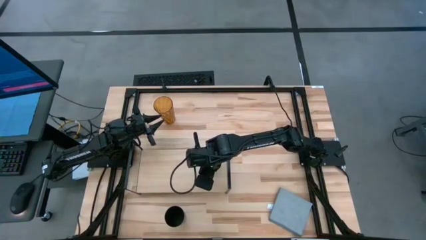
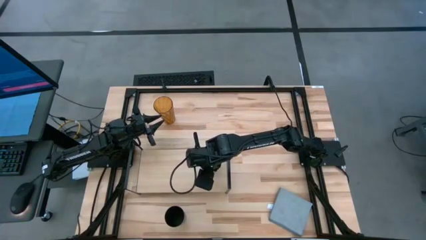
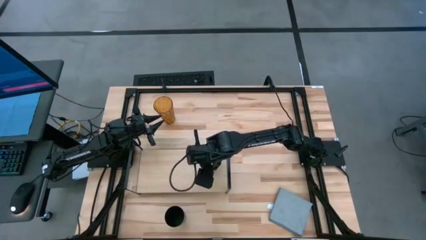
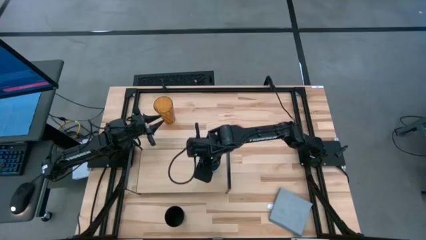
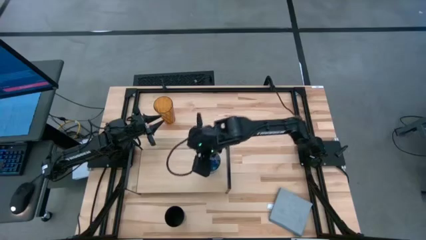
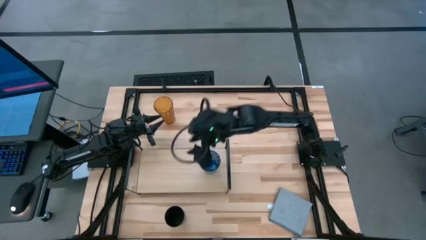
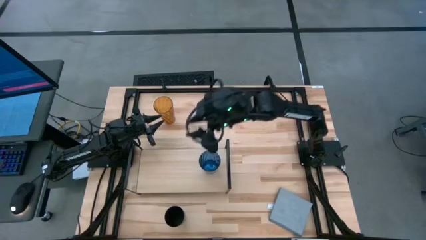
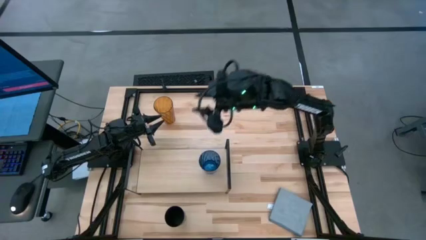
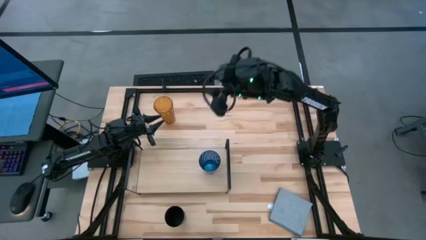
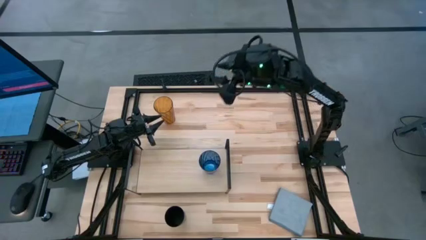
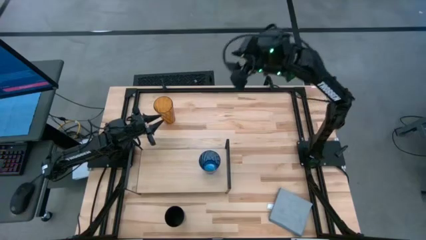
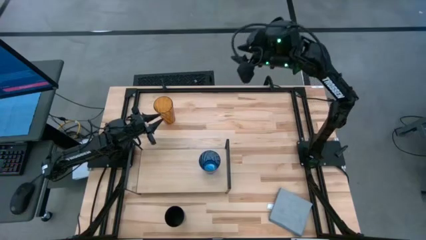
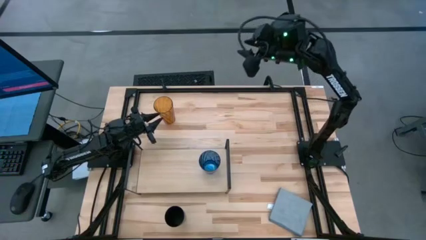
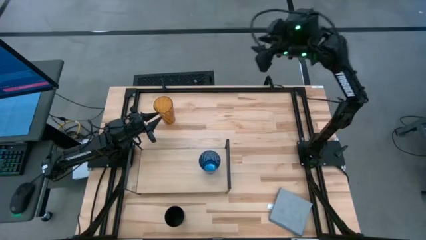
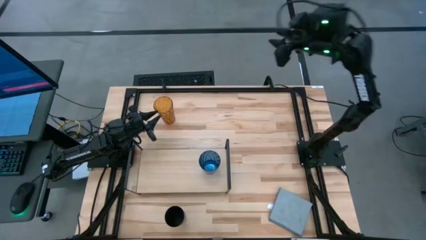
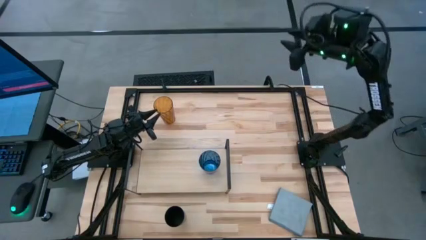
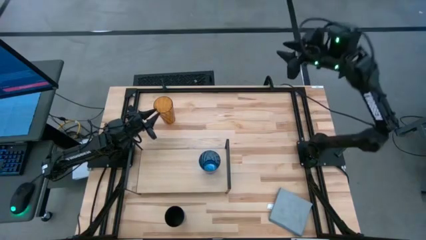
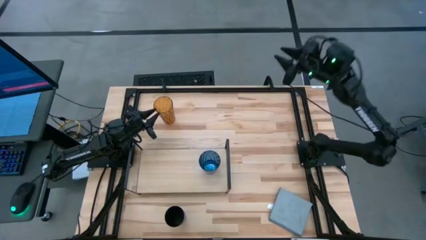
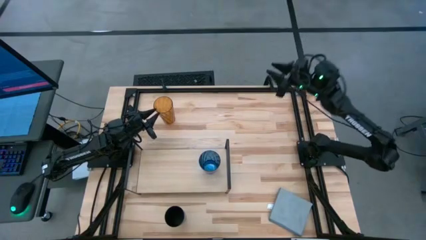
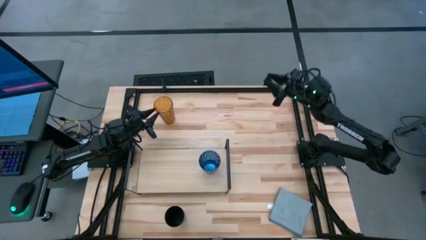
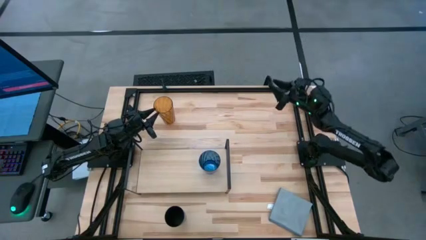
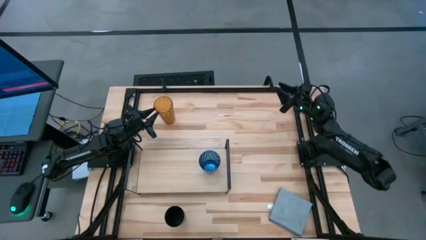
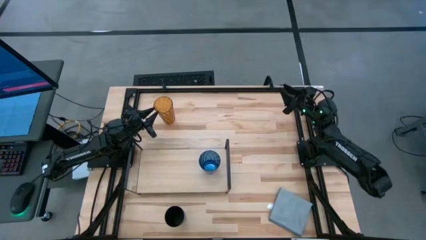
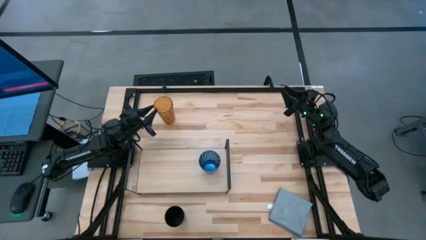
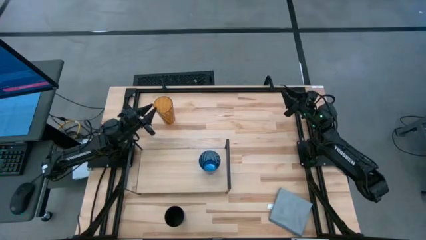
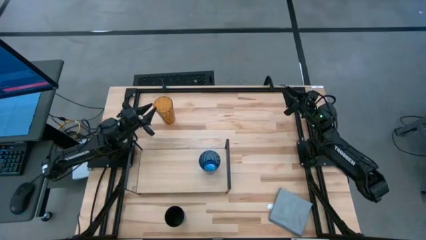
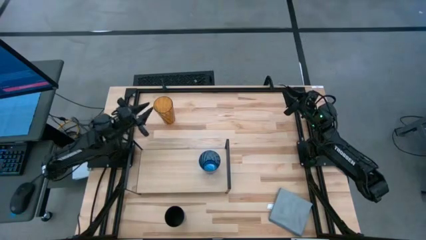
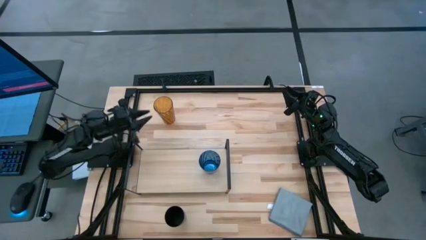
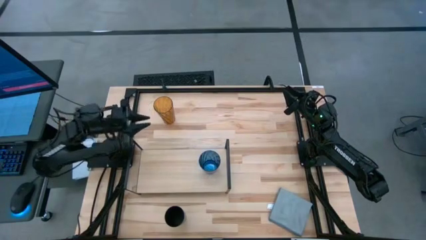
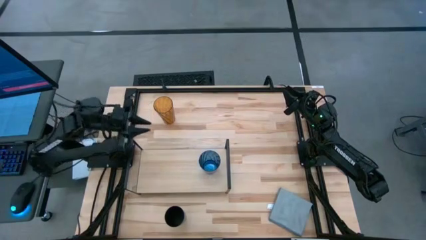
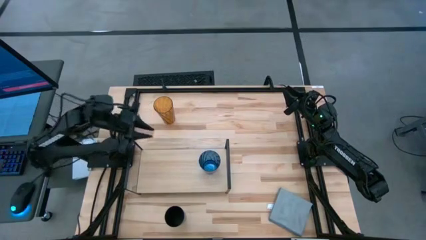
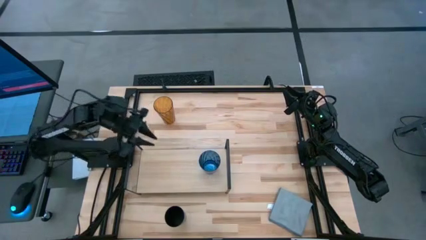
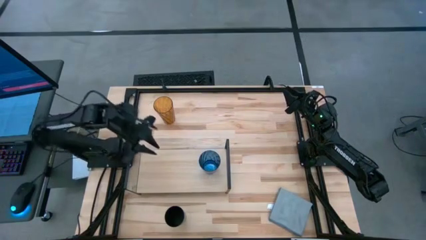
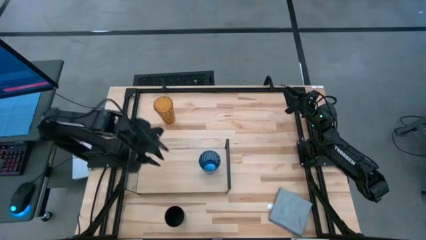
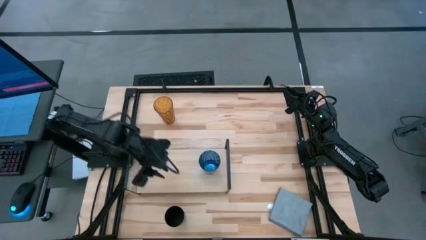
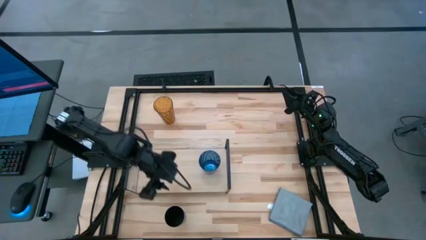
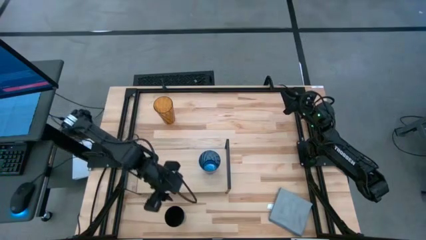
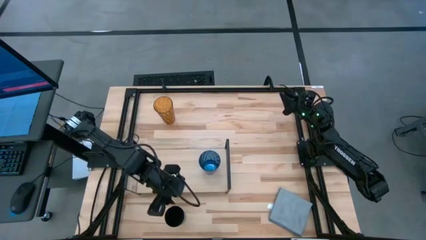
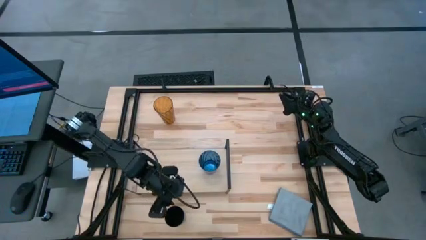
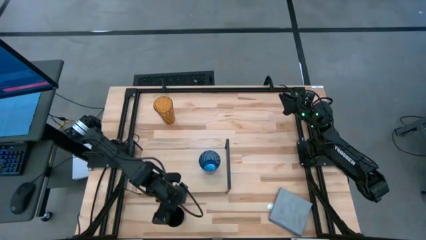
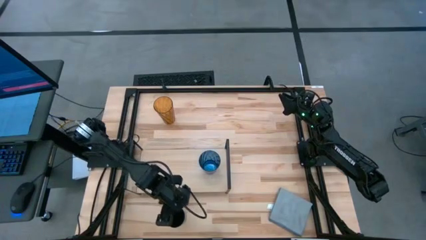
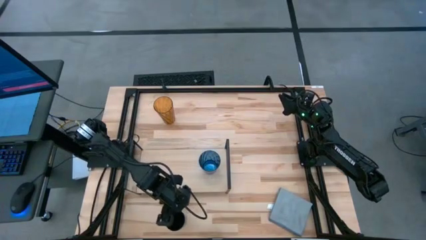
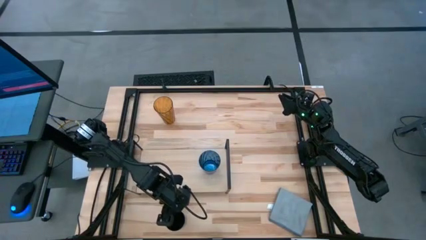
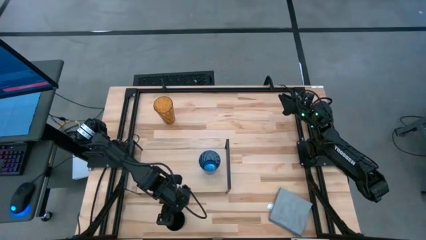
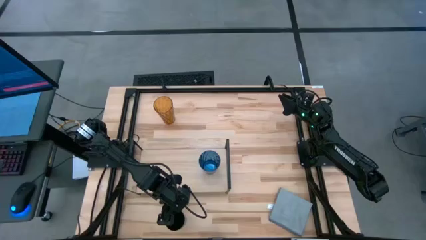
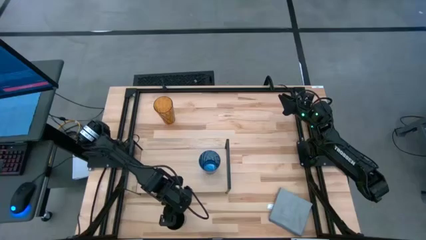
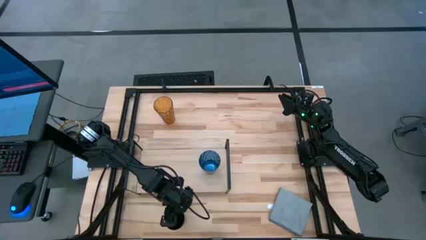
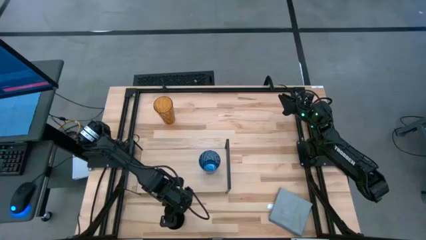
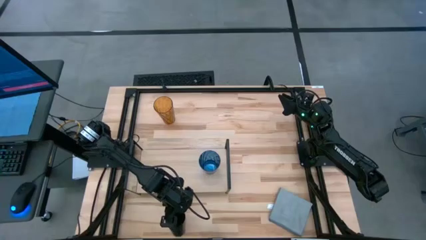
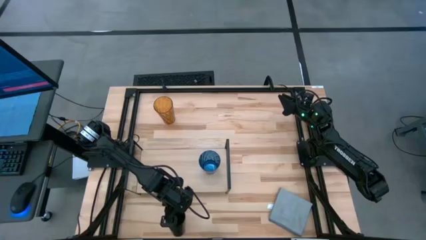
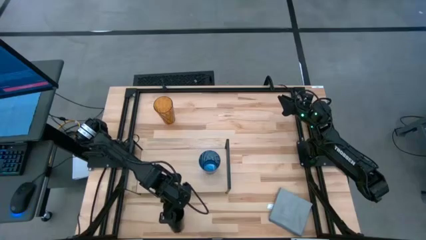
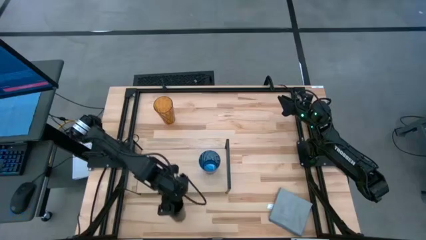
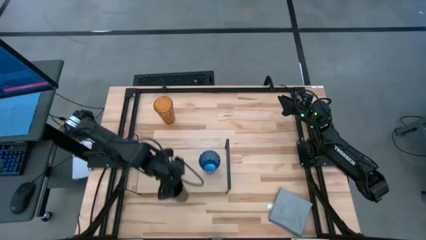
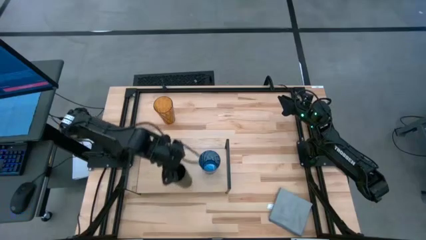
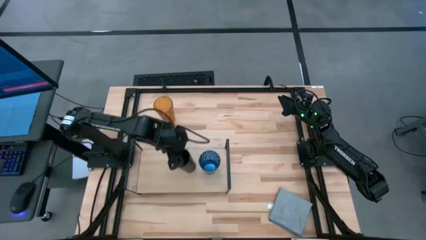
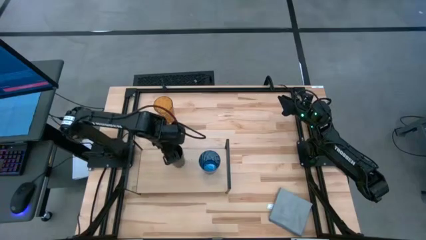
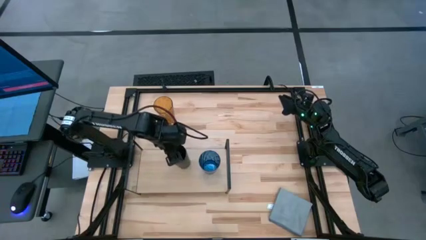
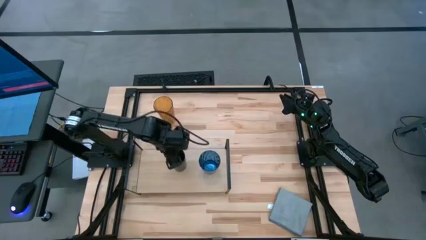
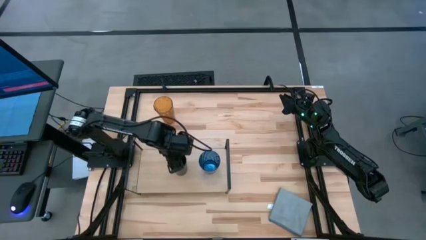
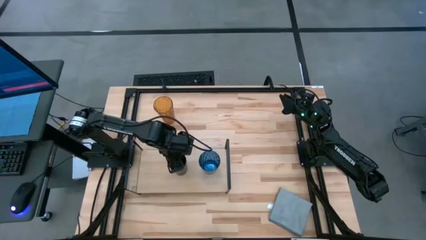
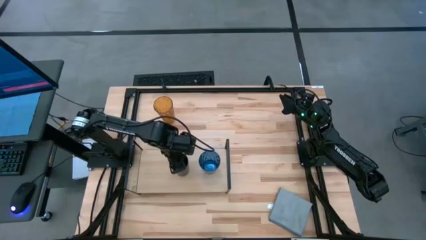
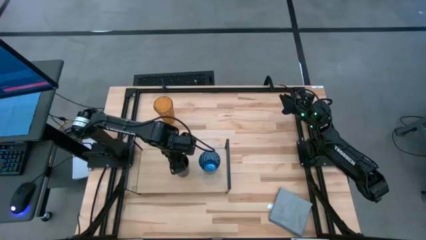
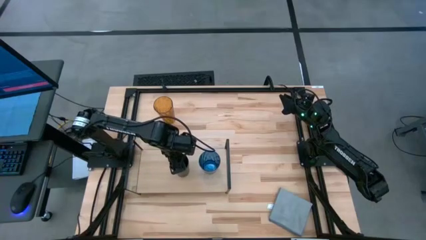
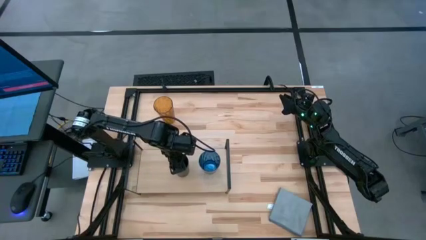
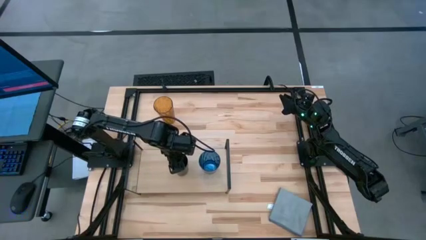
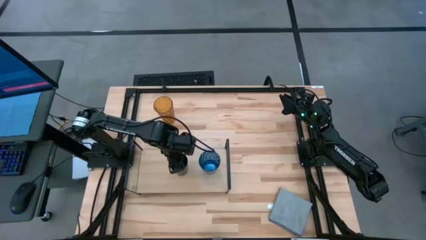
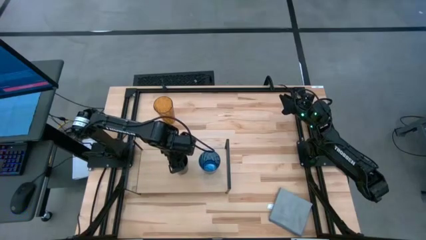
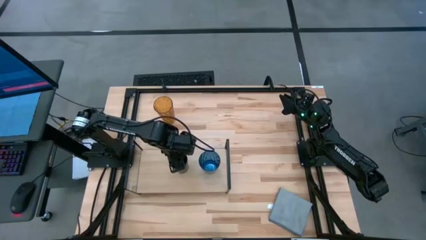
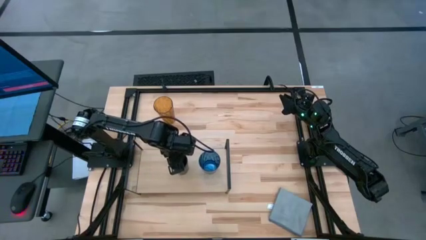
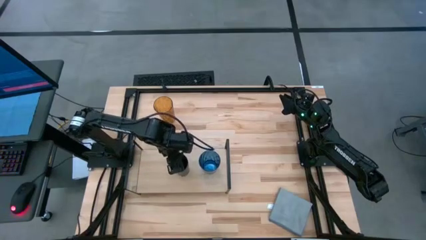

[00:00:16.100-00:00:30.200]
Task: Stack small to large cups/mugs on shelf
Put the black cup on the shelf
